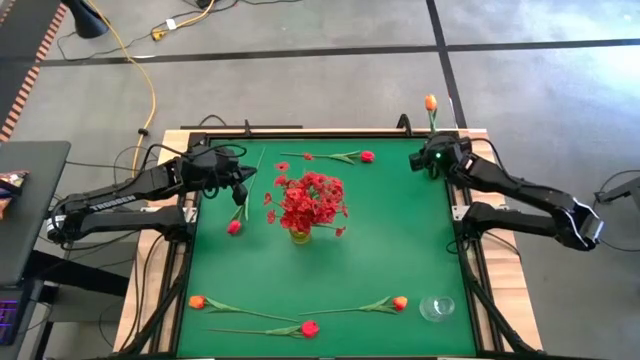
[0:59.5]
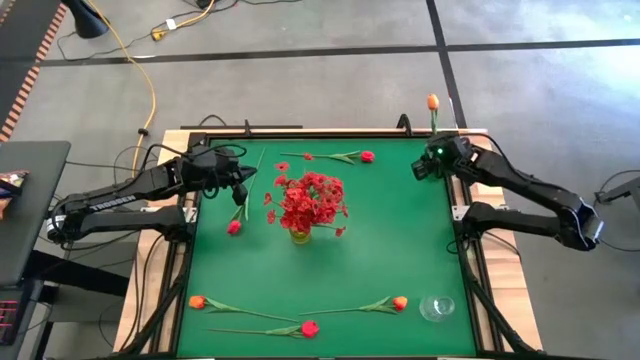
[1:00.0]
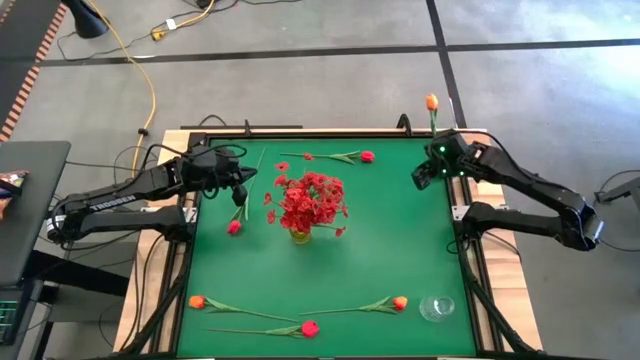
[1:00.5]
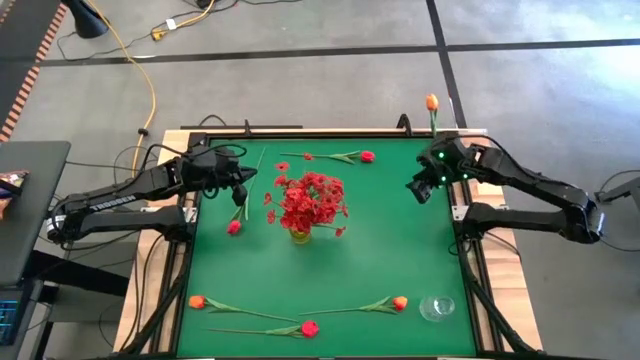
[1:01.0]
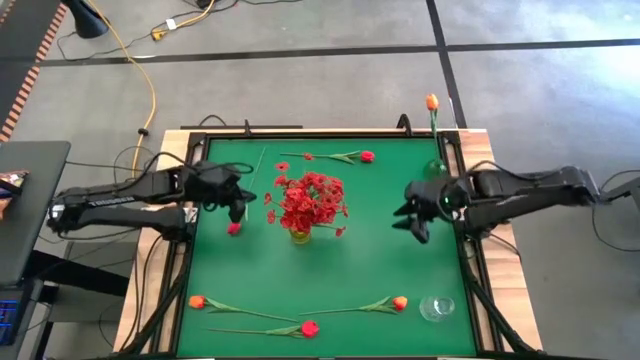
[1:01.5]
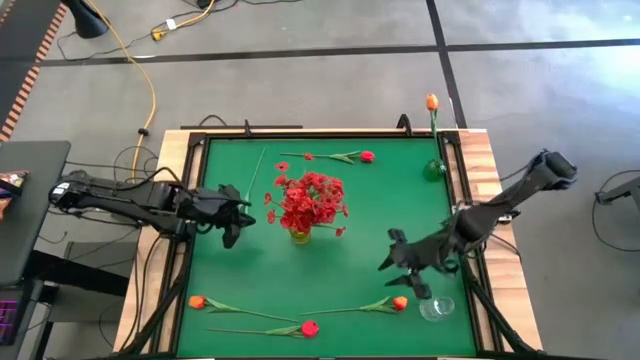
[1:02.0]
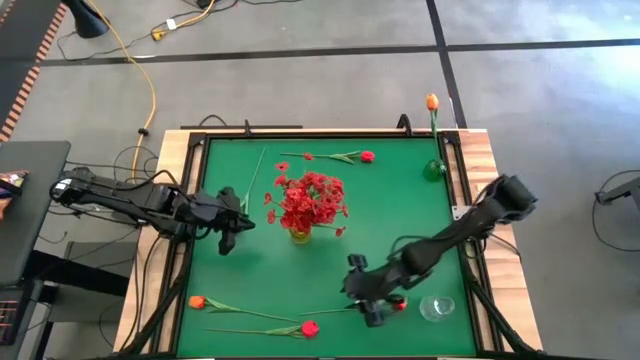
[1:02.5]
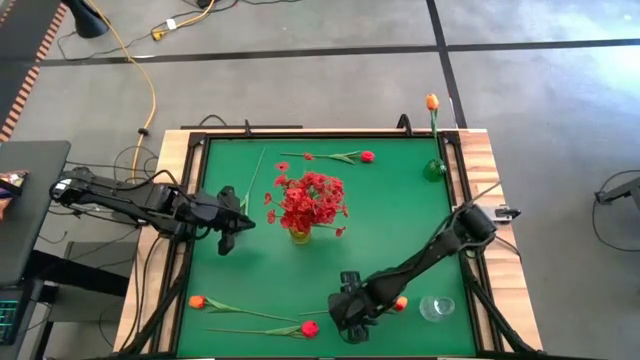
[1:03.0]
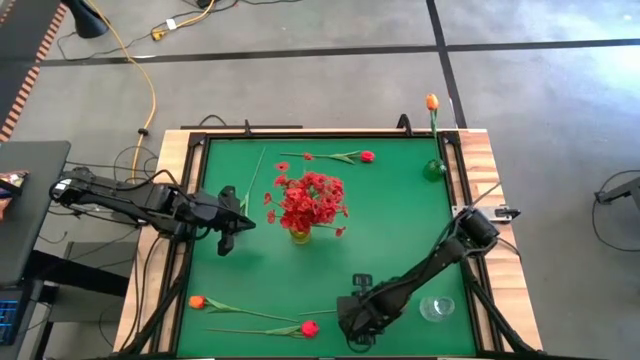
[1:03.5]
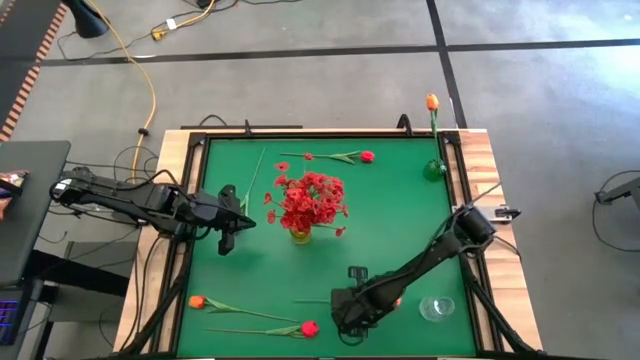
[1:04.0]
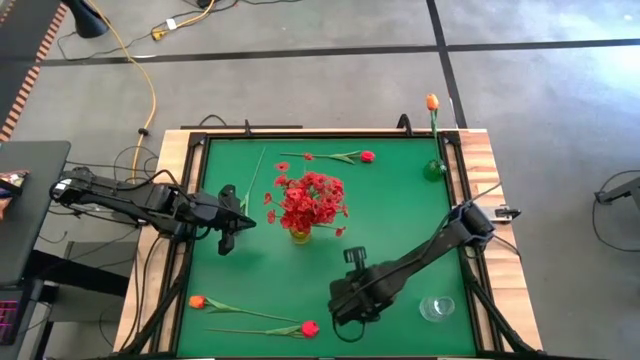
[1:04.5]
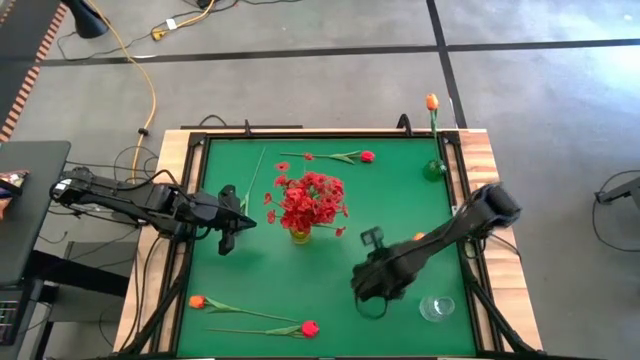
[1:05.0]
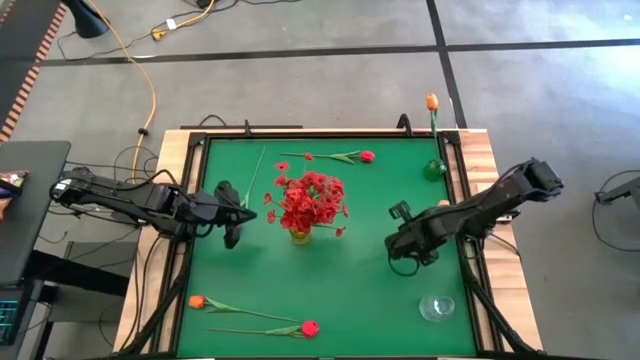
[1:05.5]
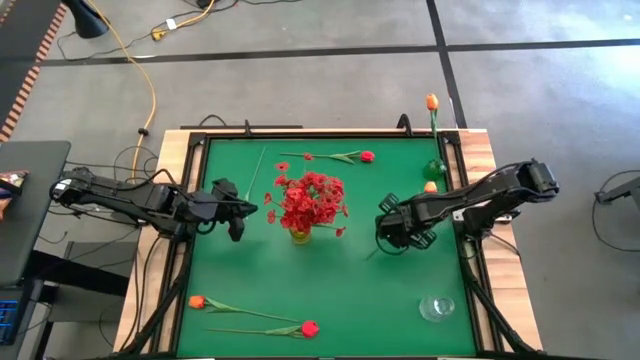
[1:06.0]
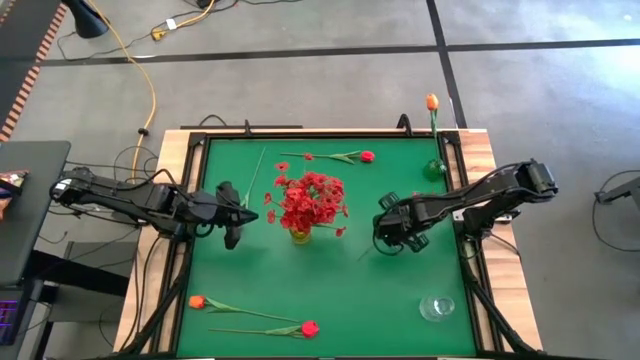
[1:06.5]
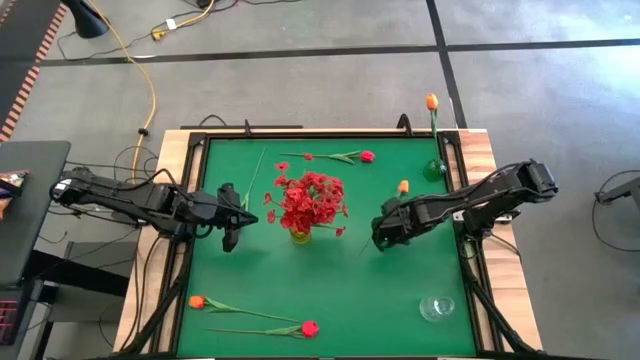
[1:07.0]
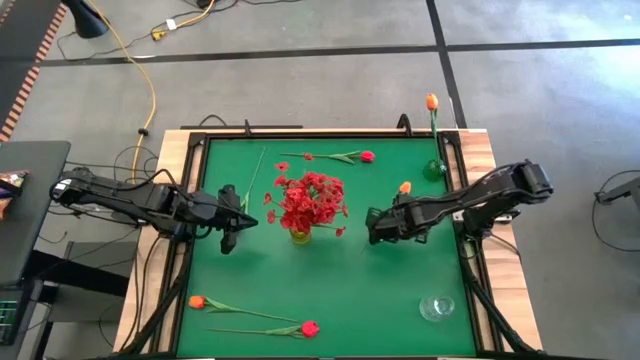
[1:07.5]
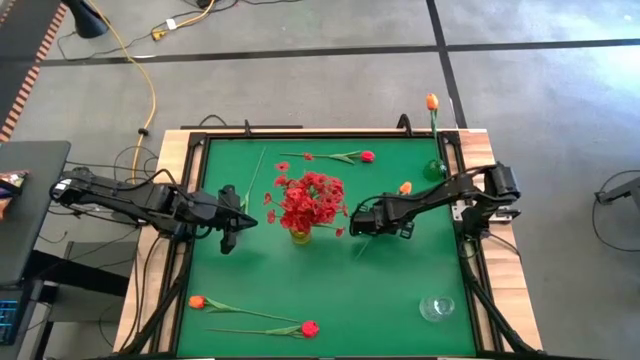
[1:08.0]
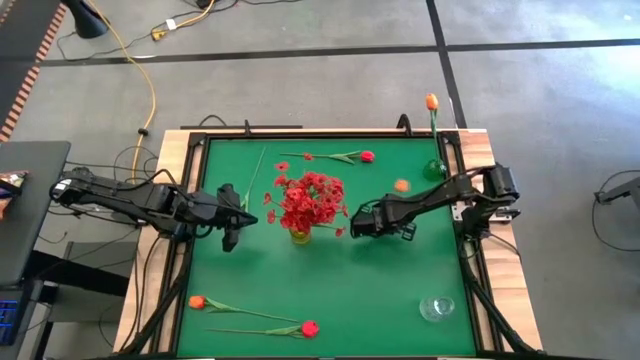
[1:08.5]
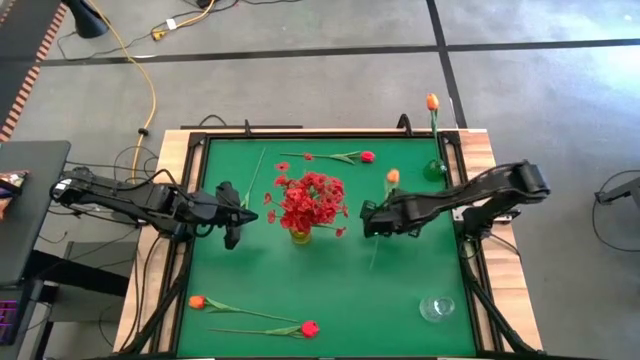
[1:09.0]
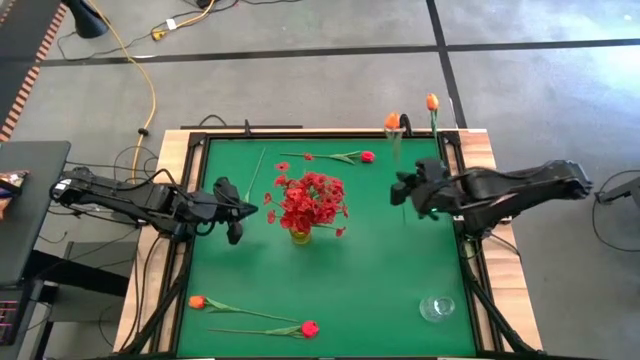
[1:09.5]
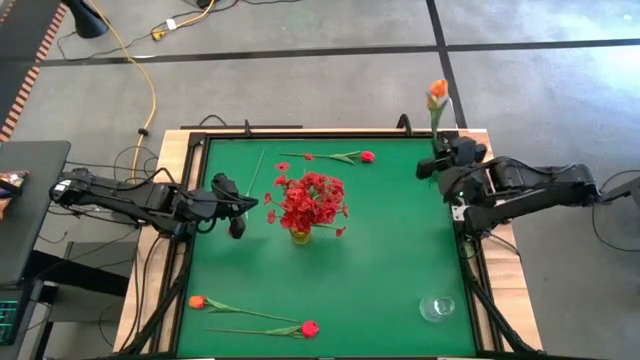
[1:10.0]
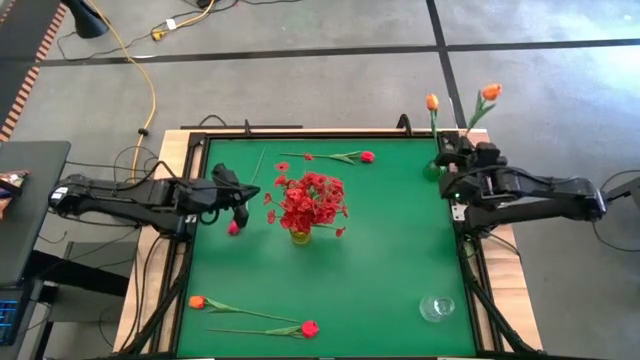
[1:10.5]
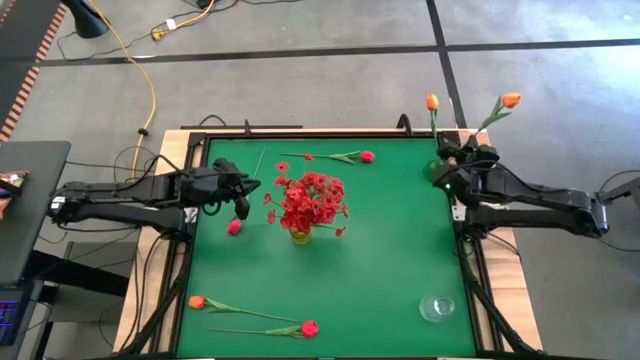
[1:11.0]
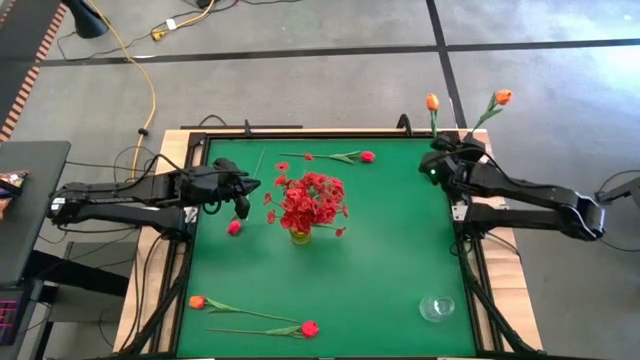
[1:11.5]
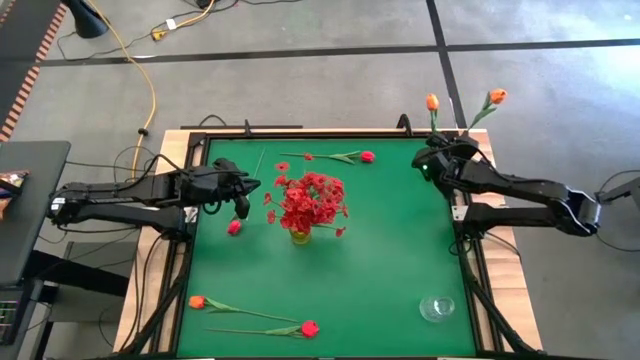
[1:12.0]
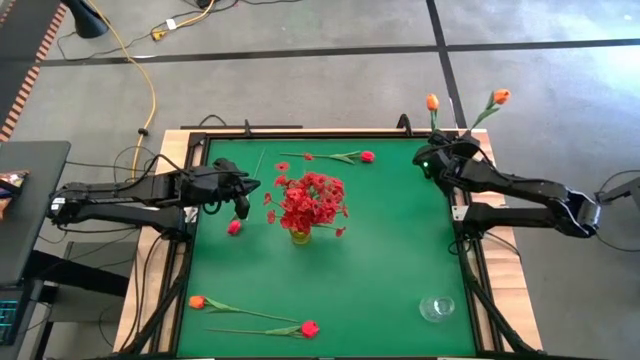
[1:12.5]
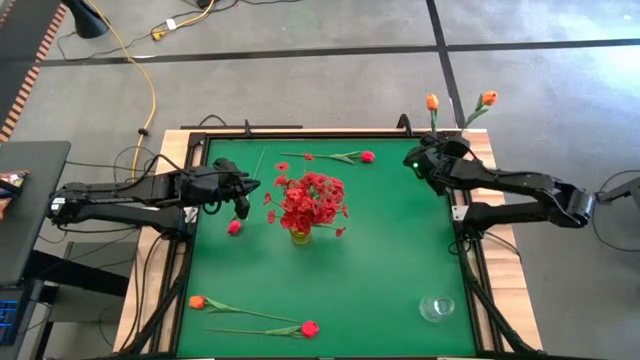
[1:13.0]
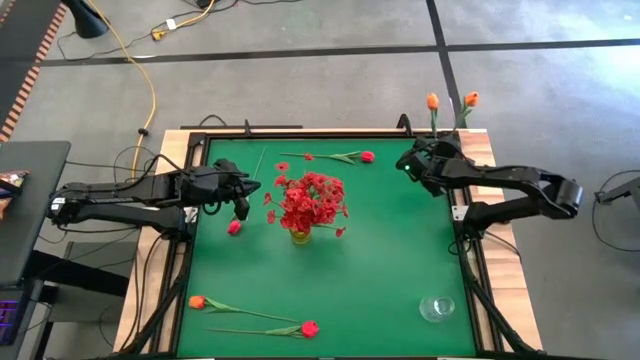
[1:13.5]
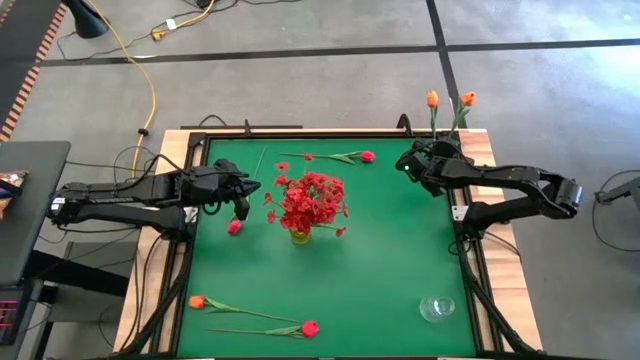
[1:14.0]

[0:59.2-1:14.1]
Task: Sort flowers into vase by color
Put the right orange flower into the green vase

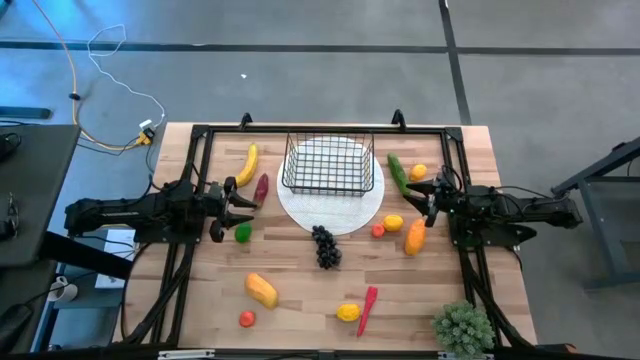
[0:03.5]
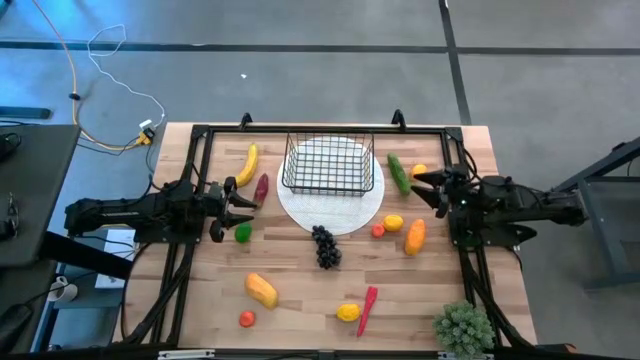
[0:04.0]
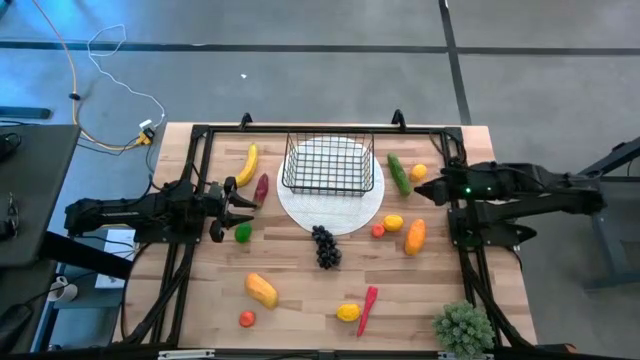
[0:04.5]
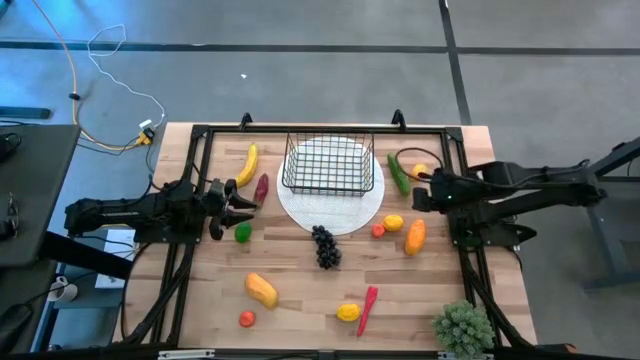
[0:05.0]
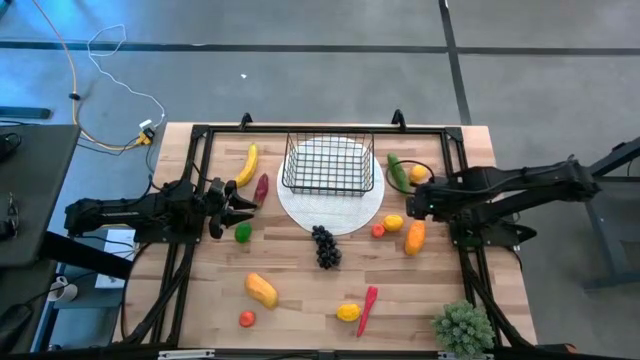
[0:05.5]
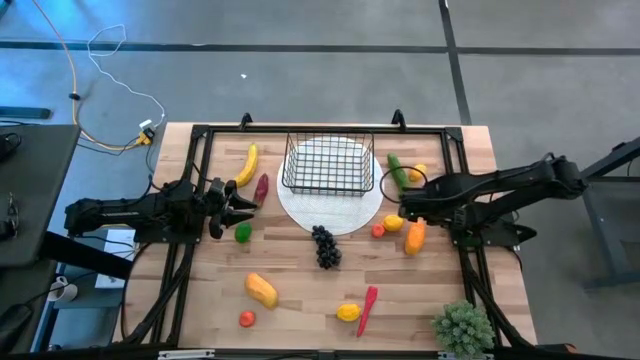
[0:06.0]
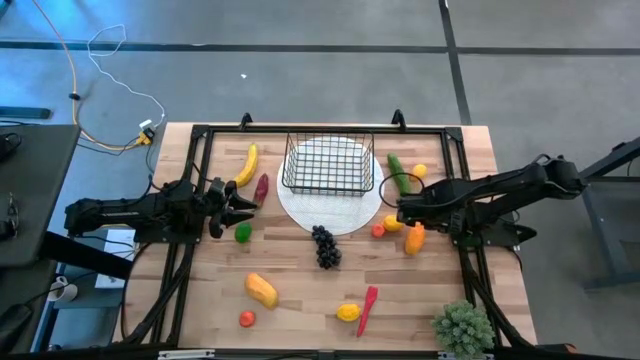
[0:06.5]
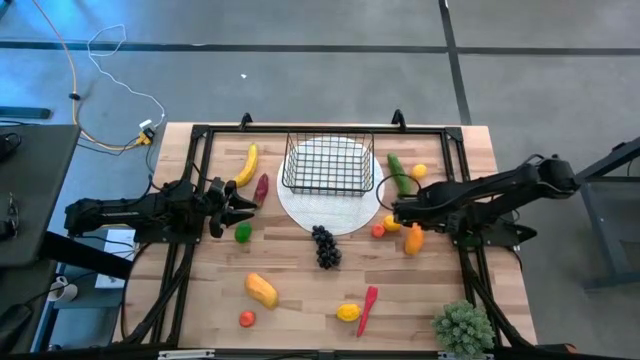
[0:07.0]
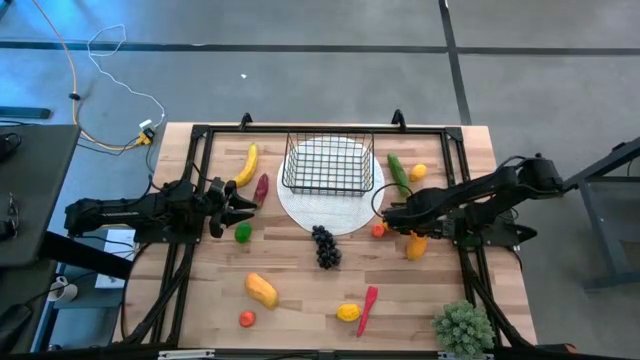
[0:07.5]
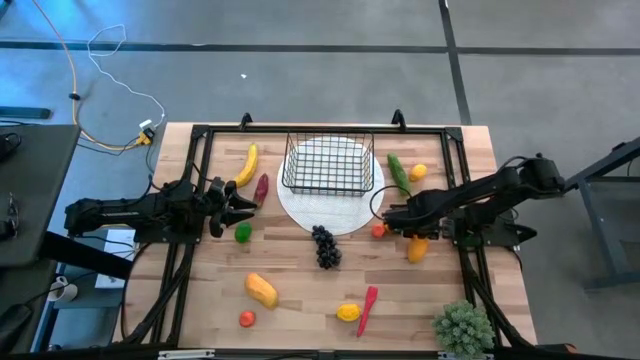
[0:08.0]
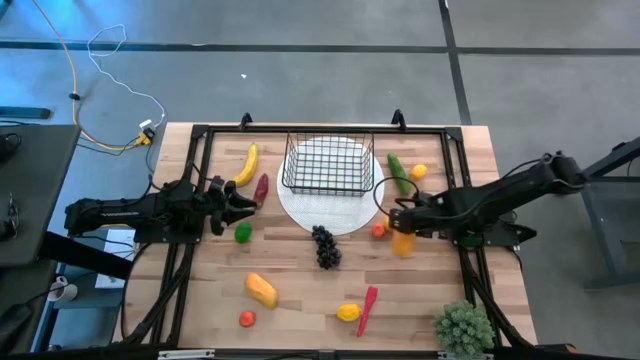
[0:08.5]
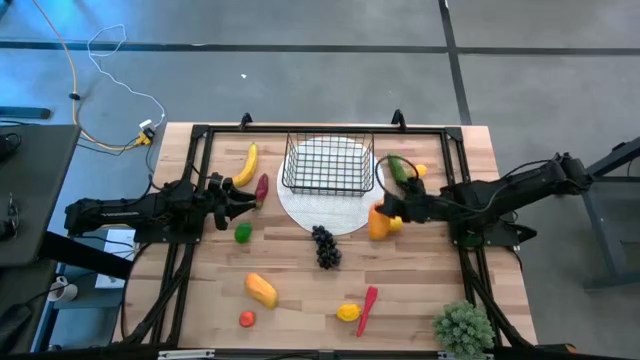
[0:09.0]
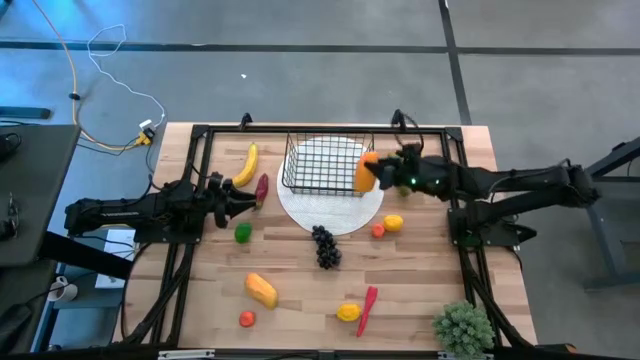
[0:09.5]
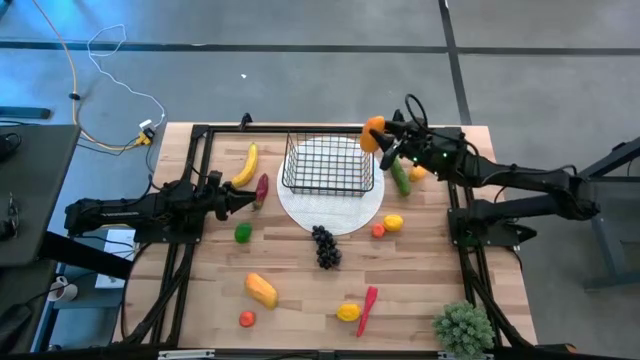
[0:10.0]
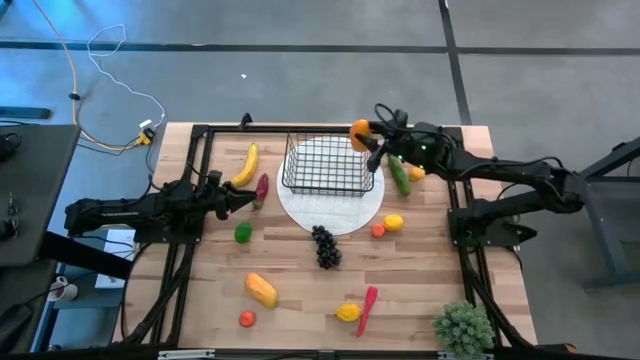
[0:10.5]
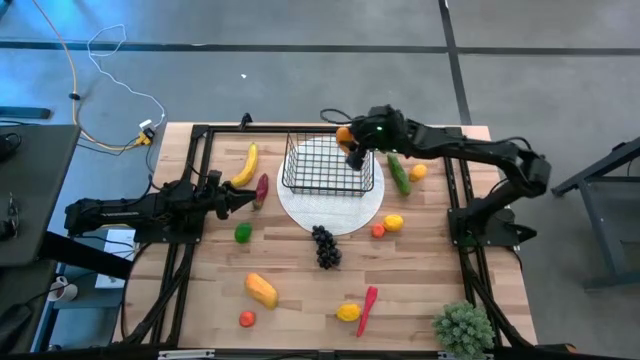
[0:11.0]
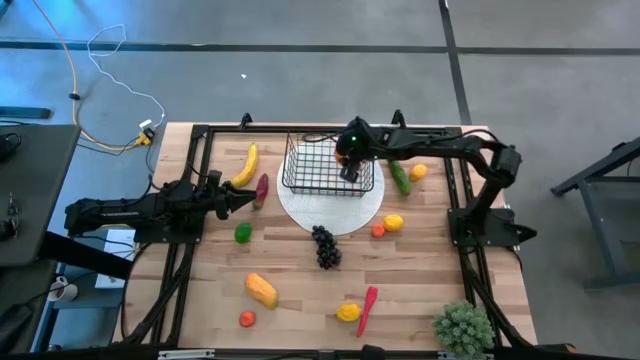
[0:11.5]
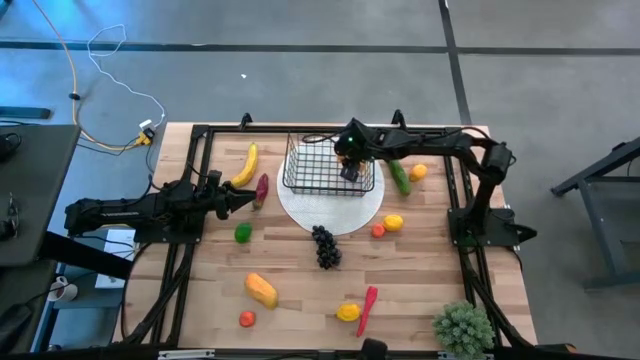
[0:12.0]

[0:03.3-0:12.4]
Task: Build produce basket
Put the top yellow mango into the wire basket
